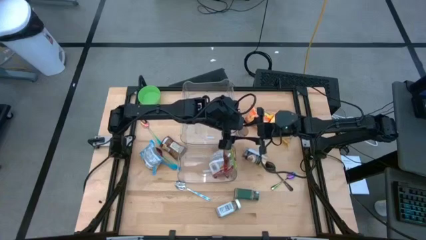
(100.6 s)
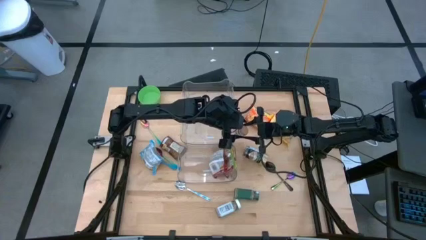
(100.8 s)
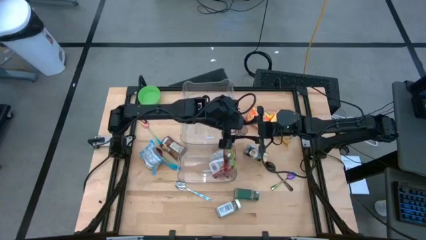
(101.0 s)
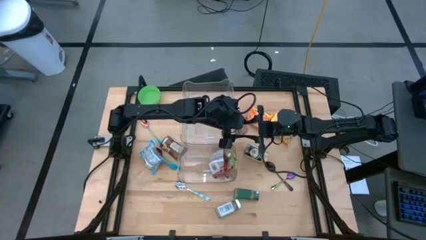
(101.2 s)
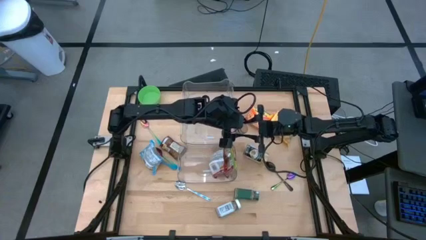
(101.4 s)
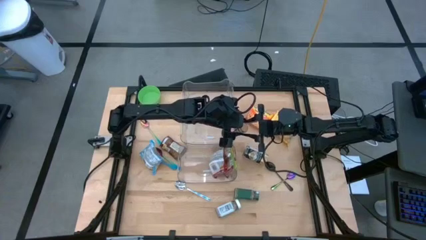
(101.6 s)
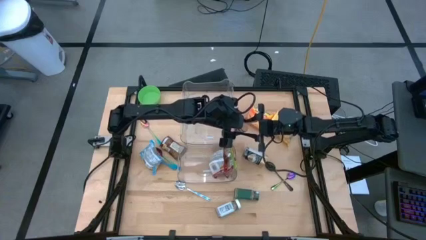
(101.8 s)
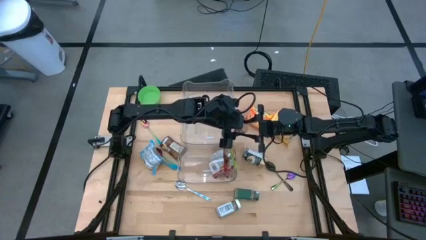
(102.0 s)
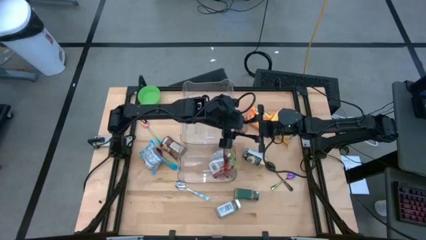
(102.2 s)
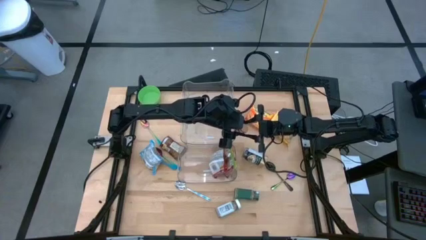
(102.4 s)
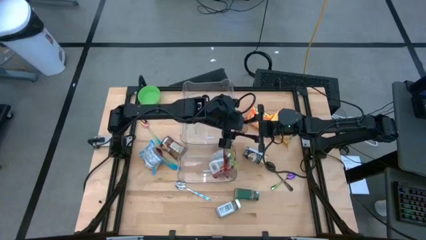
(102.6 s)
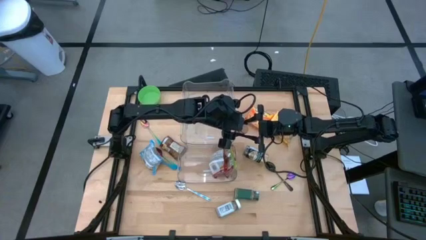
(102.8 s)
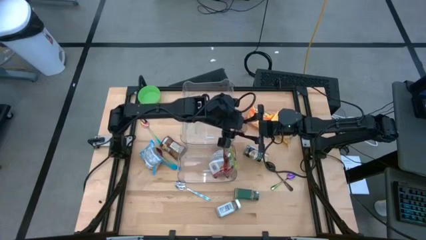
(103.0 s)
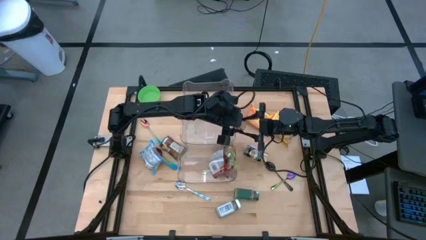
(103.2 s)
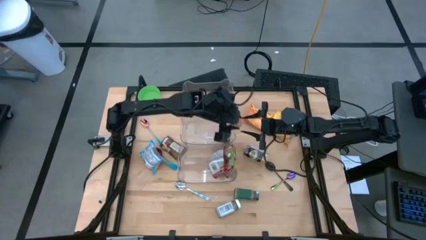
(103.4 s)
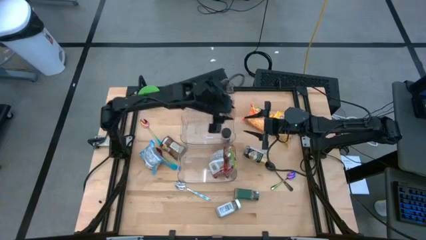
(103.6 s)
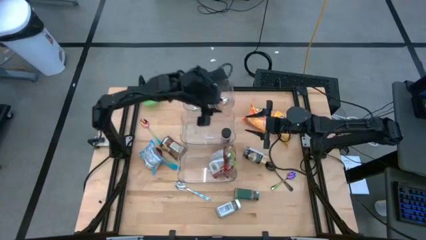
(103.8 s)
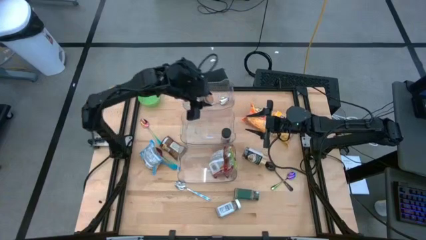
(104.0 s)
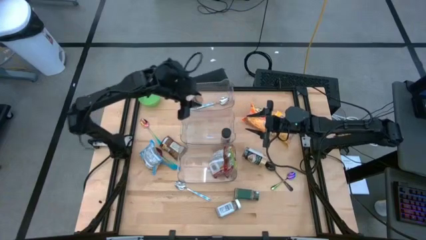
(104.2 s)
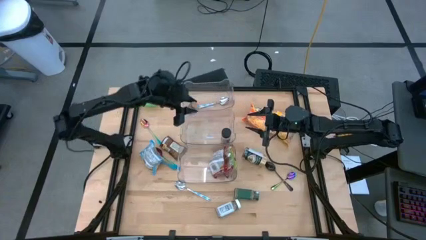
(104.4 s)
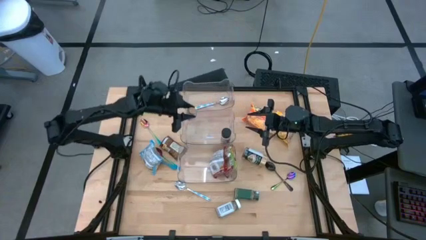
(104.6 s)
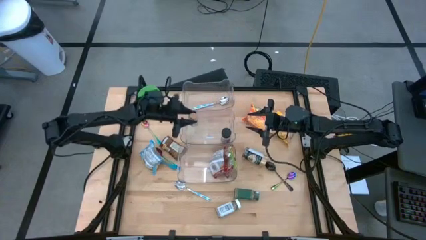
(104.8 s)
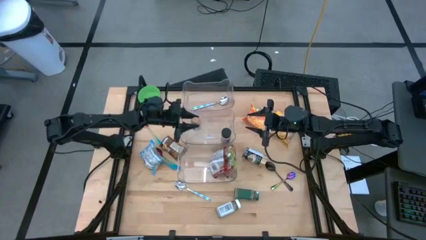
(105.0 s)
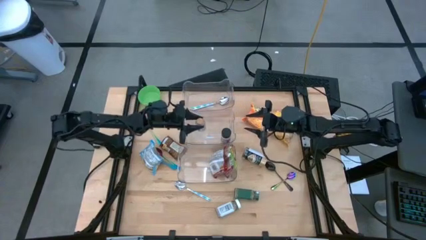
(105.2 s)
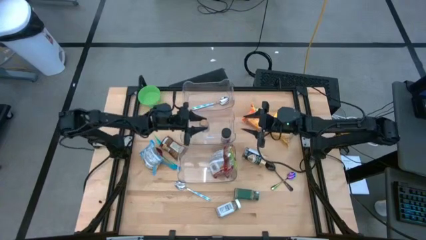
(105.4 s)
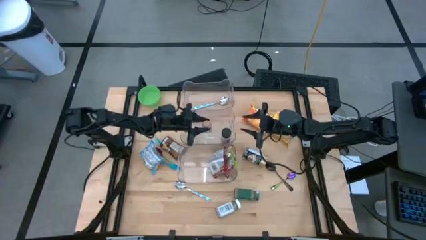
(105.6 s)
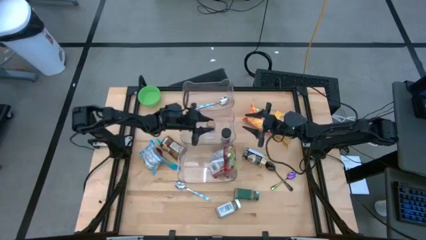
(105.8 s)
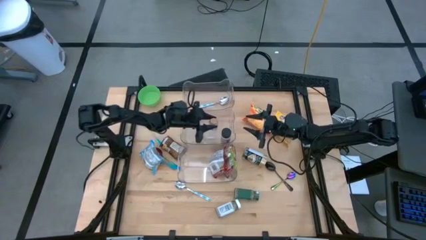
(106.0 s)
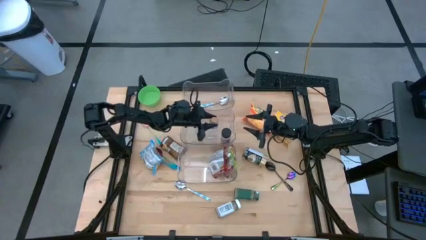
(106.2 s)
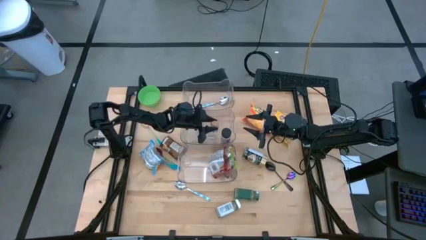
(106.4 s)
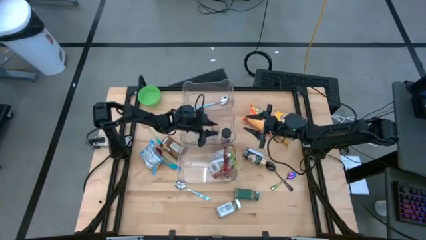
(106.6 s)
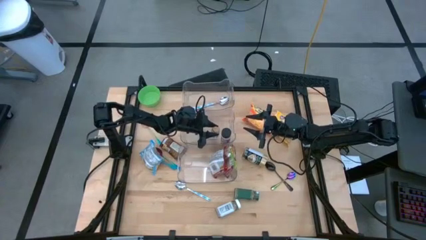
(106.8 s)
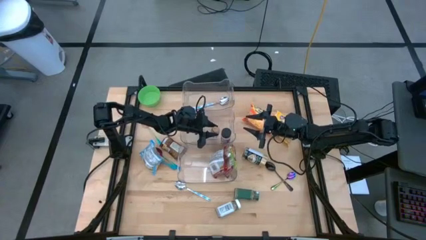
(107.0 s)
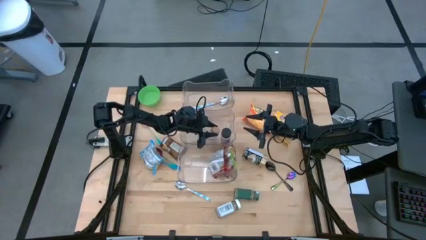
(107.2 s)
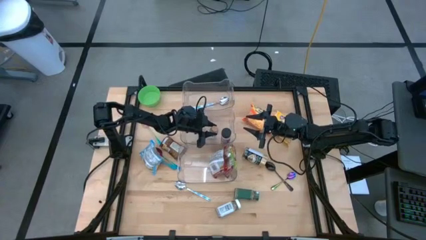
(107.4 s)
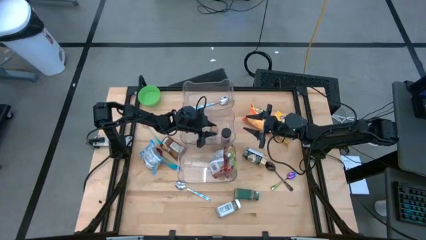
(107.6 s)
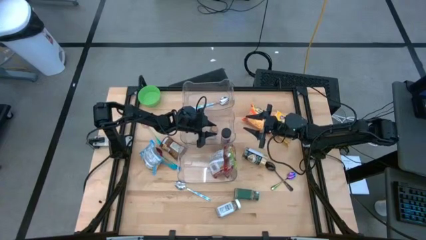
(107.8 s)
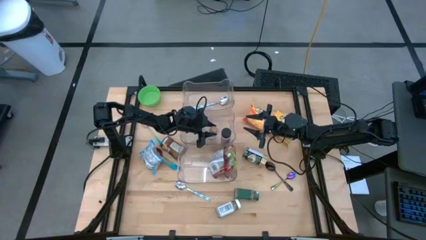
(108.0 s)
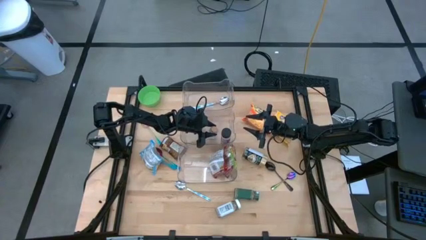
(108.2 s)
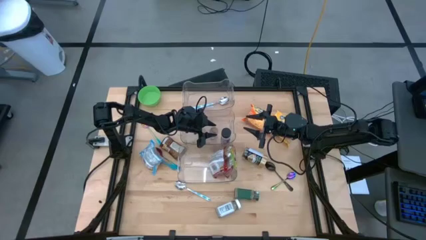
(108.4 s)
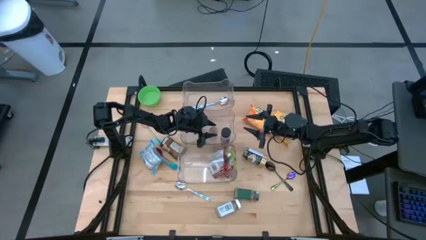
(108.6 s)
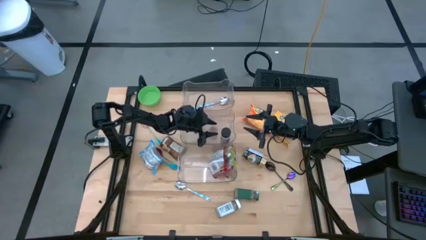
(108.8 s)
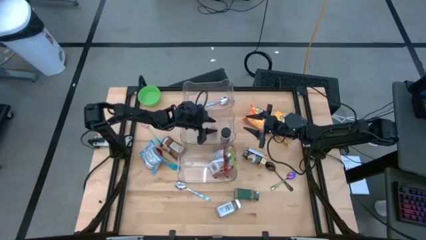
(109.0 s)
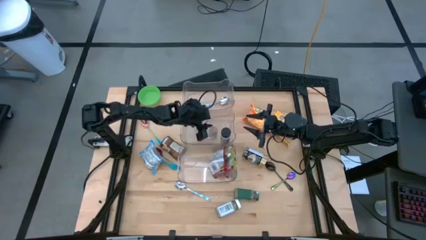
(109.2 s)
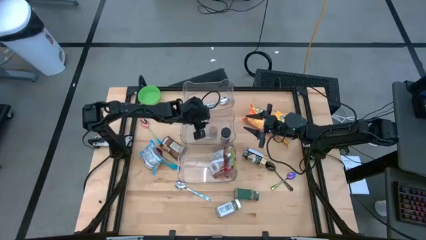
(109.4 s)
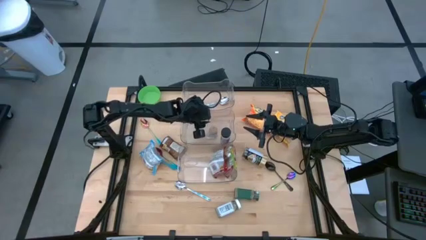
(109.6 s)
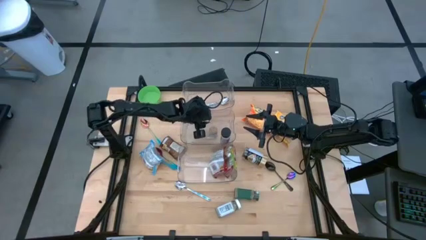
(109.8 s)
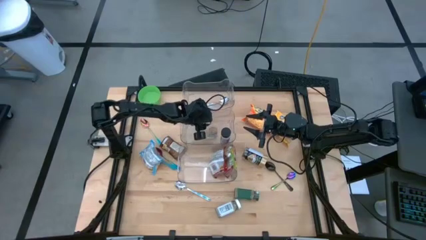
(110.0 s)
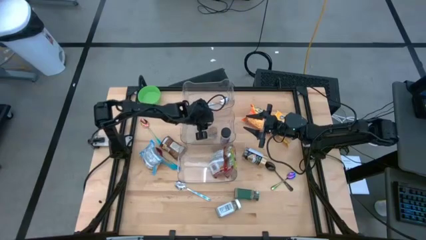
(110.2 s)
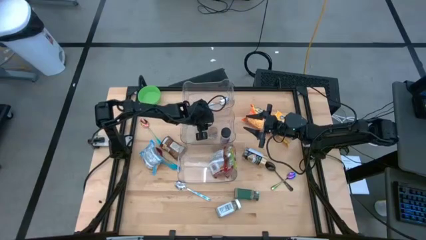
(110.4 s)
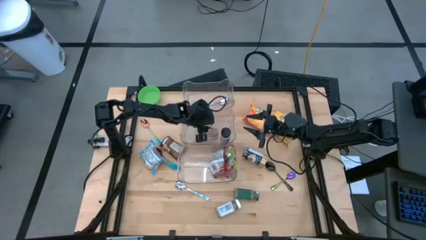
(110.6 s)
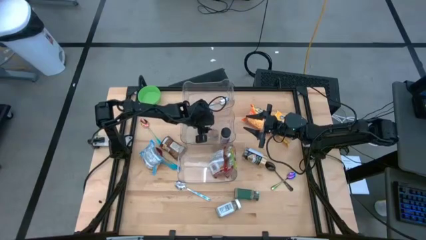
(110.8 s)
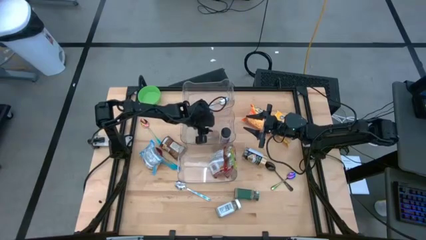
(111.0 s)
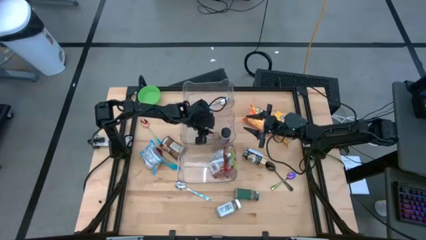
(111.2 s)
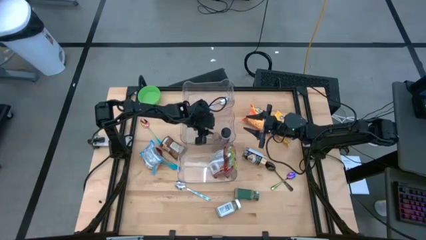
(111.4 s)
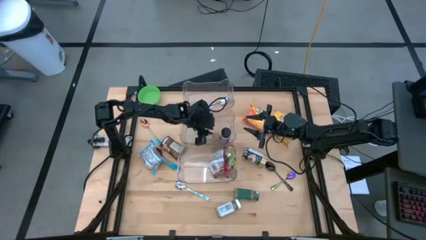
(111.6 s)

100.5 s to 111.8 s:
Task: Pick & Place Food Item
Put the brown seasoning bottle into the middle transparent bin

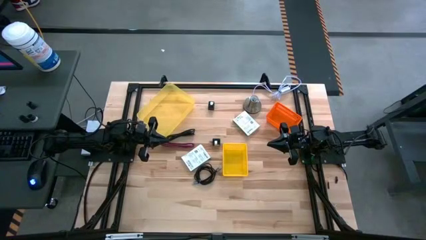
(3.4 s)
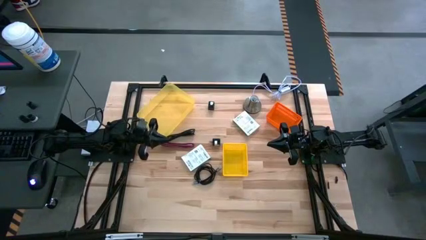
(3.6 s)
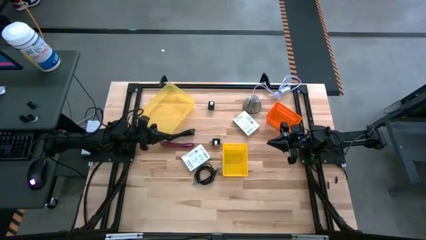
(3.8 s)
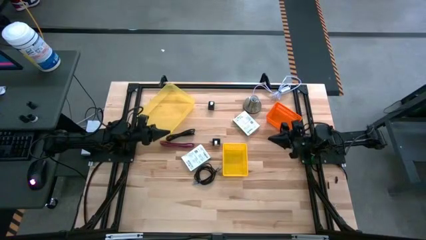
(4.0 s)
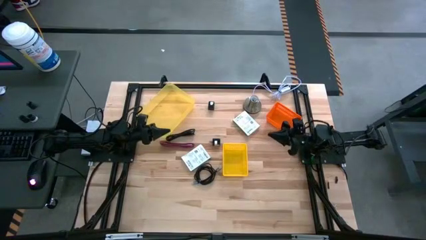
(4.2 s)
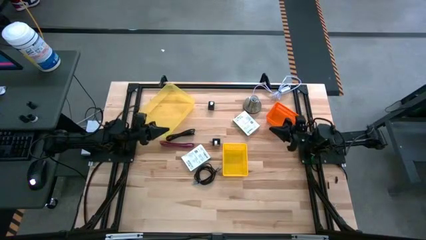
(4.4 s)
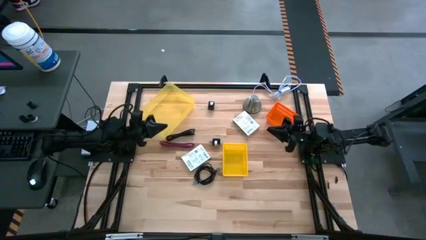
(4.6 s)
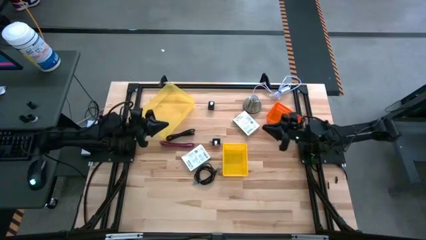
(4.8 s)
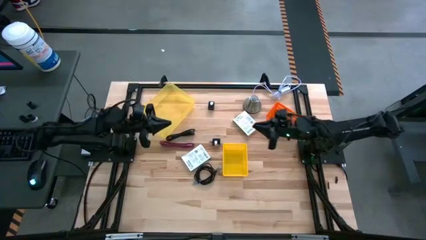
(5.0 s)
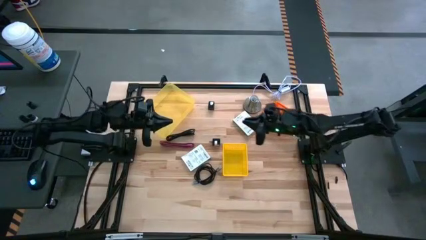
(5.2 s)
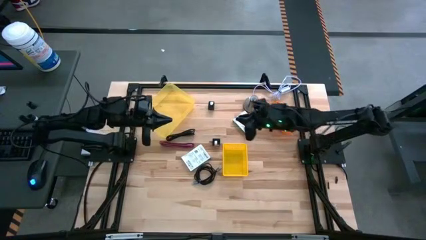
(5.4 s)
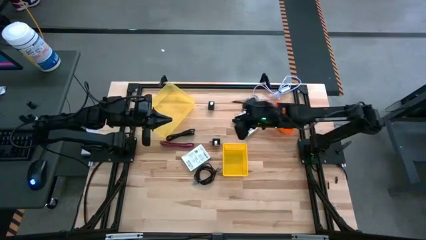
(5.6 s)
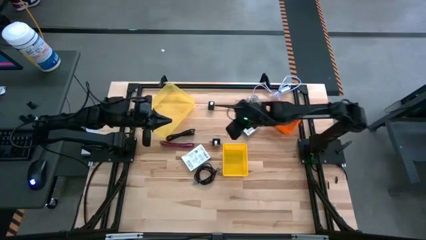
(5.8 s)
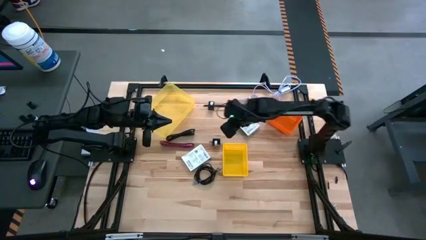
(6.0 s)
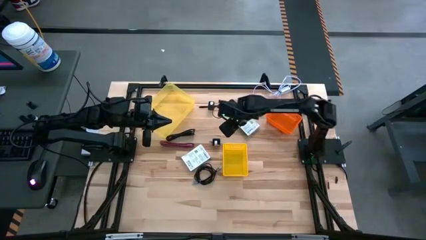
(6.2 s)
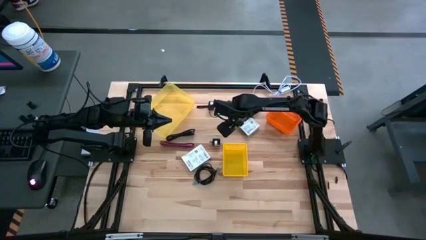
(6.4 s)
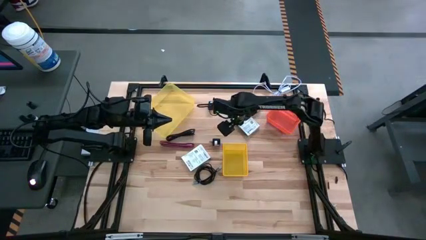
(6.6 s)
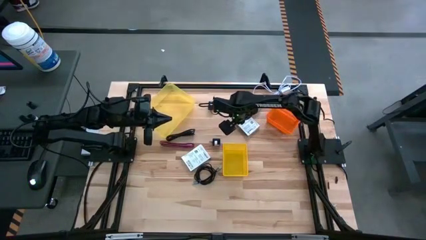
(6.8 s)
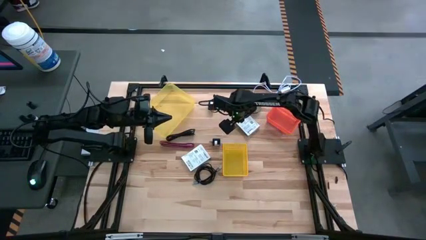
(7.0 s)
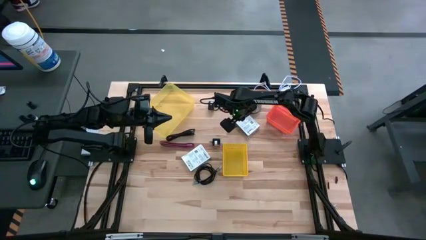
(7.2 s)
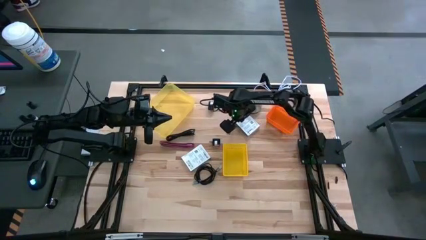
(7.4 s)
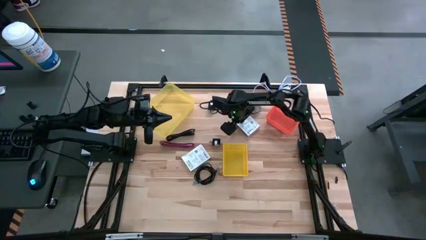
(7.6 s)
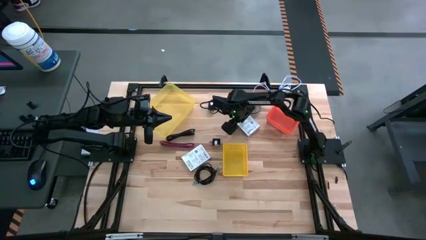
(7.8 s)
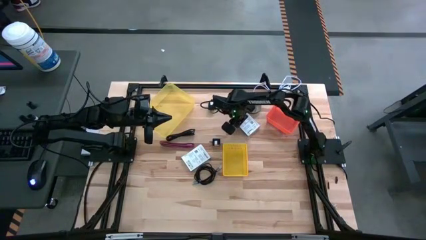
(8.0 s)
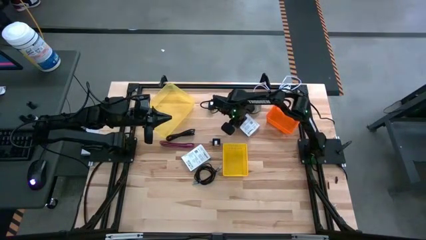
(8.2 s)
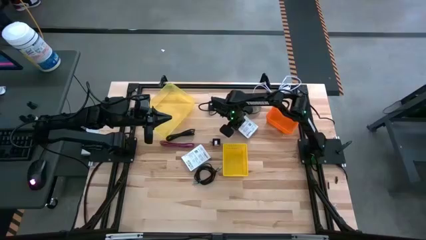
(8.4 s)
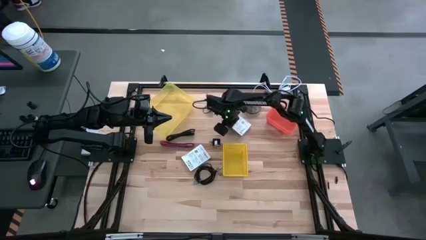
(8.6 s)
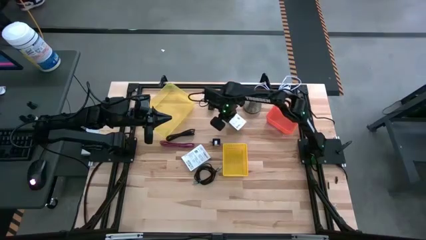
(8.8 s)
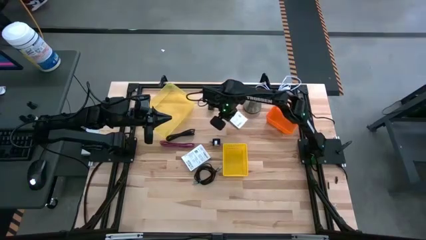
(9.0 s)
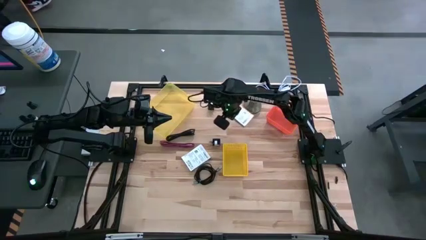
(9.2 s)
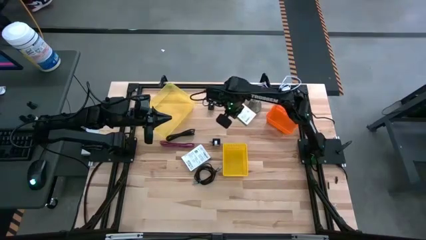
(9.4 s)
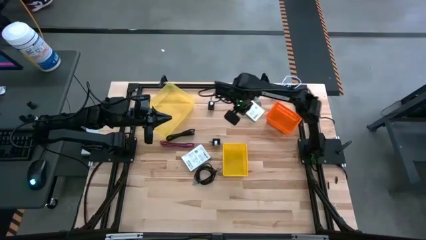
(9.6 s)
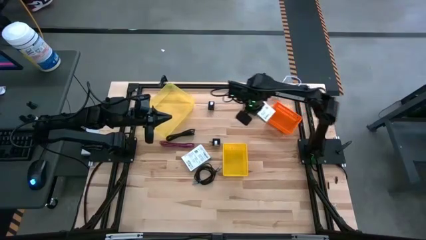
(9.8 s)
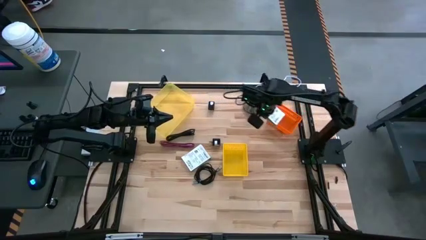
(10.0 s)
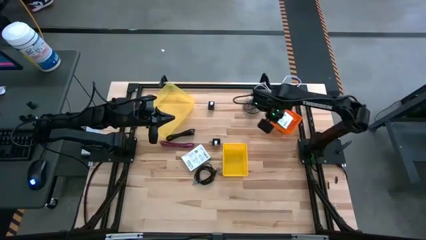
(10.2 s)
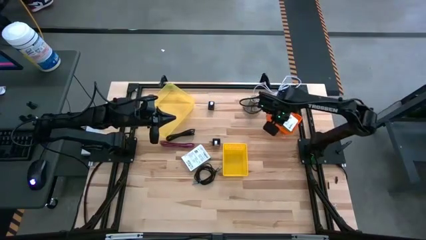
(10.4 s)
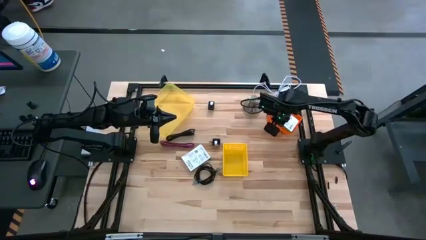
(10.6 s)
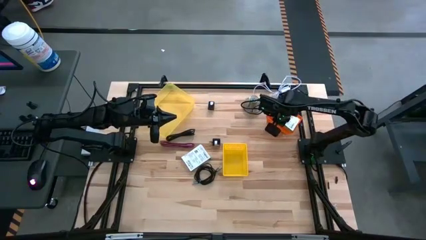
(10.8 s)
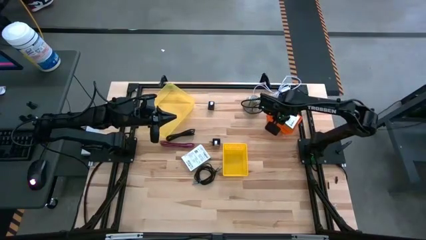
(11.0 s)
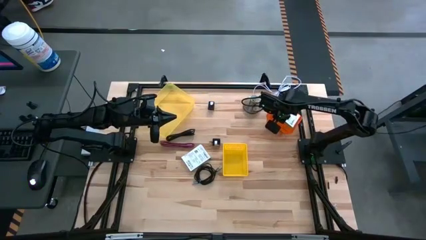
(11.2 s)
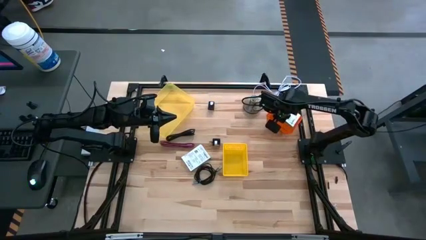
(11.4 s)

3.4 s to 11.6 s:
Task: Pick and place items into bin
Put the right card reader box into the orange bin
